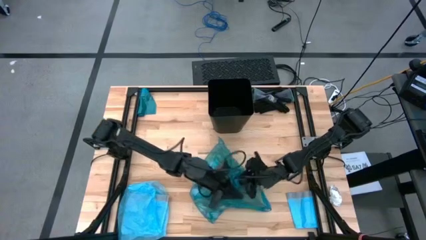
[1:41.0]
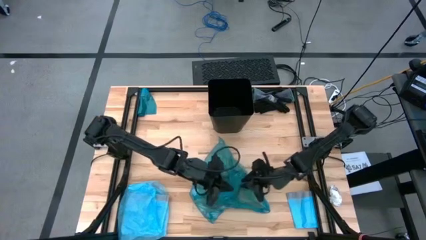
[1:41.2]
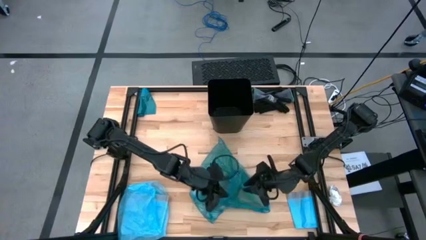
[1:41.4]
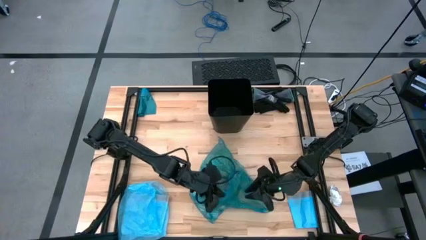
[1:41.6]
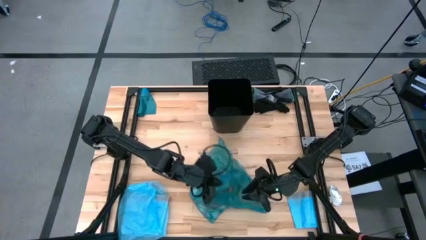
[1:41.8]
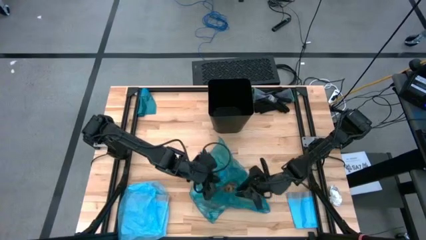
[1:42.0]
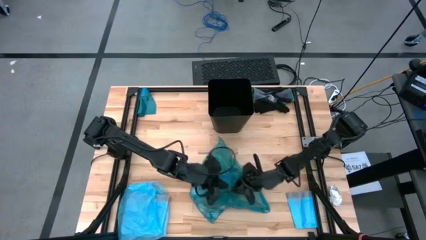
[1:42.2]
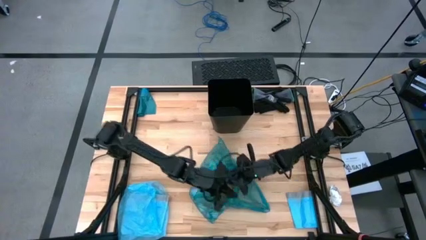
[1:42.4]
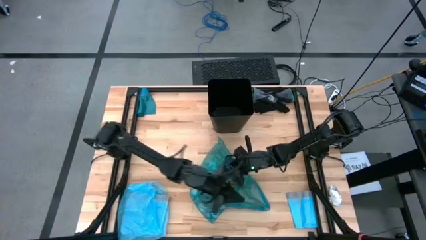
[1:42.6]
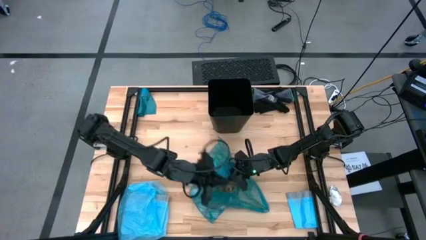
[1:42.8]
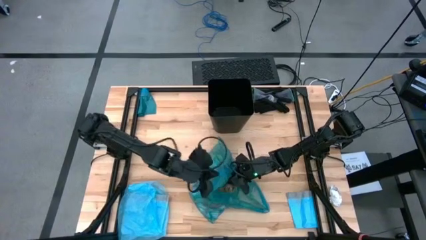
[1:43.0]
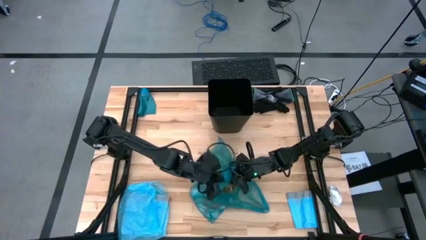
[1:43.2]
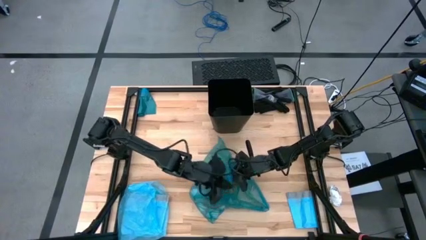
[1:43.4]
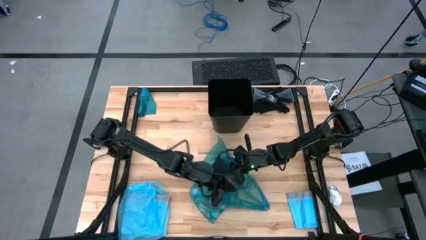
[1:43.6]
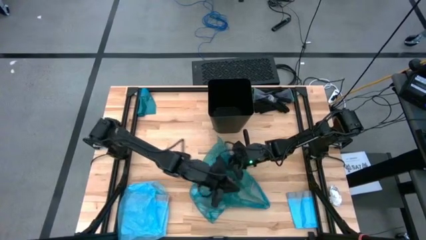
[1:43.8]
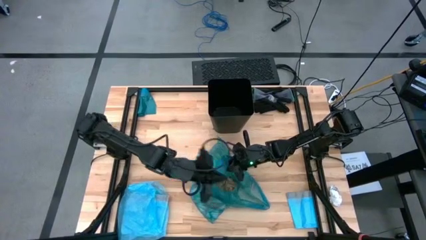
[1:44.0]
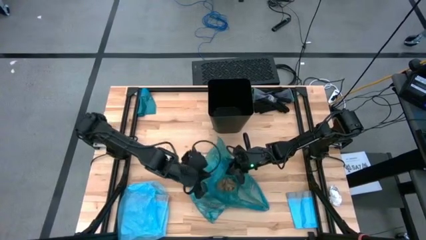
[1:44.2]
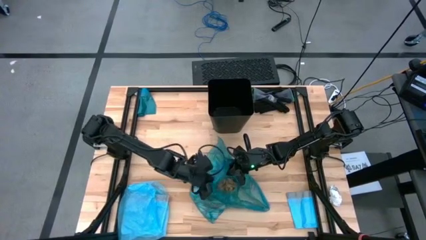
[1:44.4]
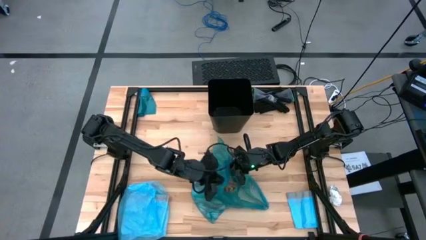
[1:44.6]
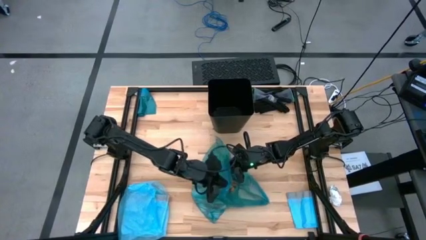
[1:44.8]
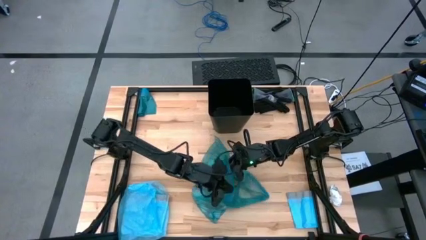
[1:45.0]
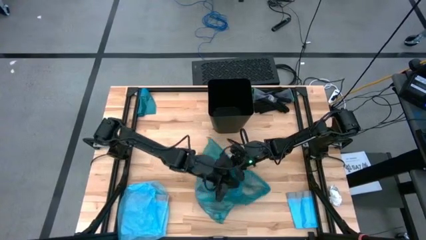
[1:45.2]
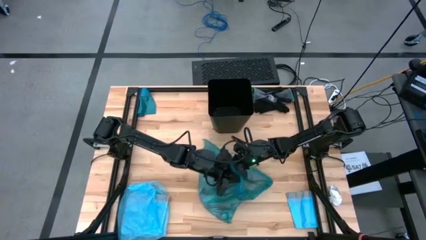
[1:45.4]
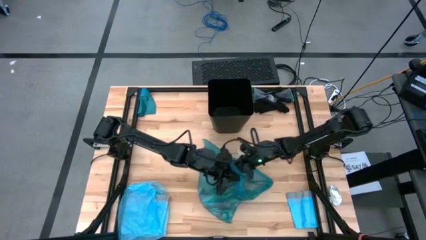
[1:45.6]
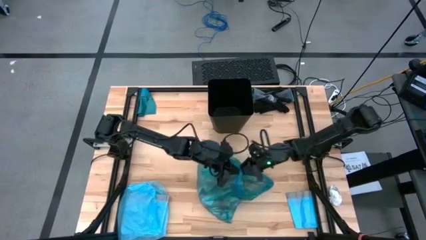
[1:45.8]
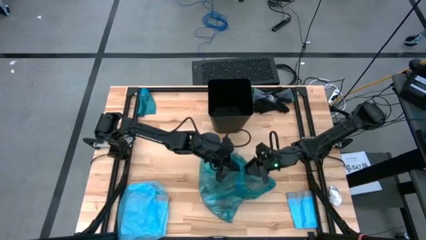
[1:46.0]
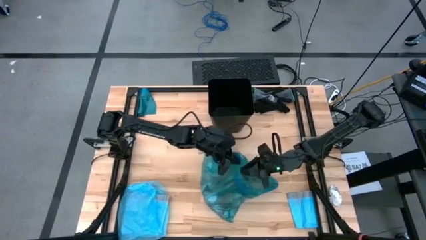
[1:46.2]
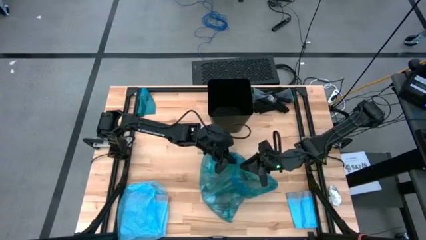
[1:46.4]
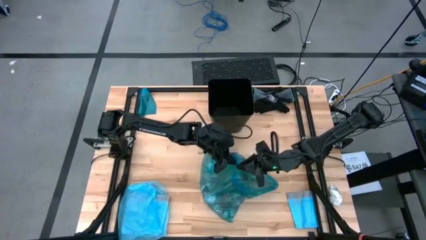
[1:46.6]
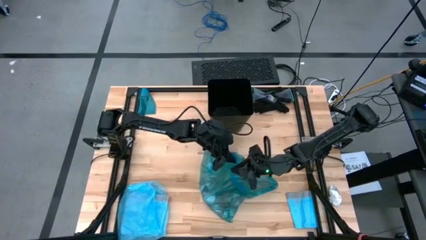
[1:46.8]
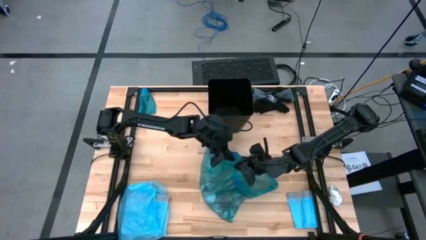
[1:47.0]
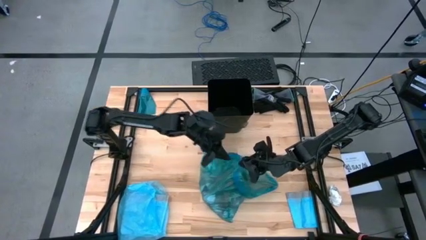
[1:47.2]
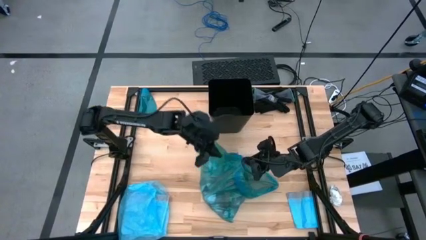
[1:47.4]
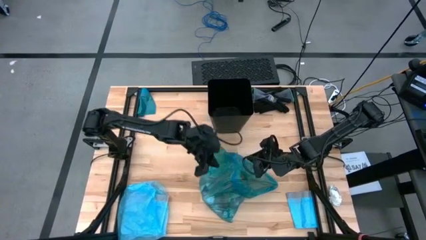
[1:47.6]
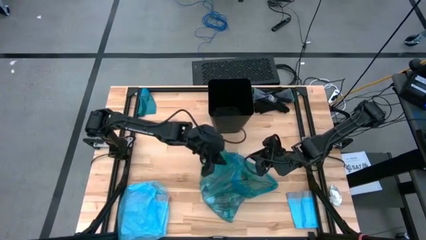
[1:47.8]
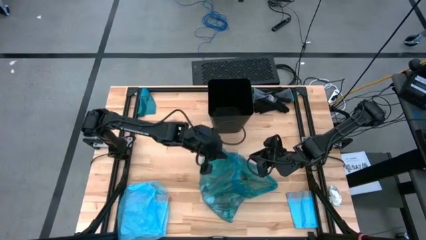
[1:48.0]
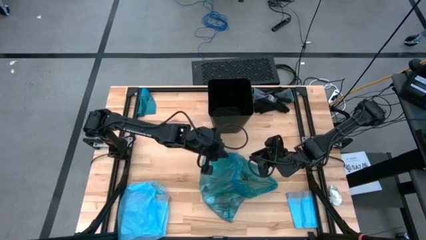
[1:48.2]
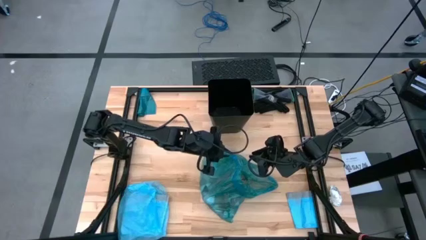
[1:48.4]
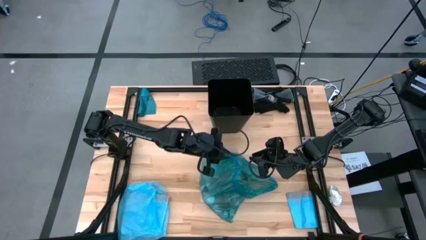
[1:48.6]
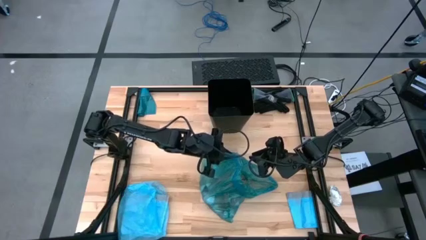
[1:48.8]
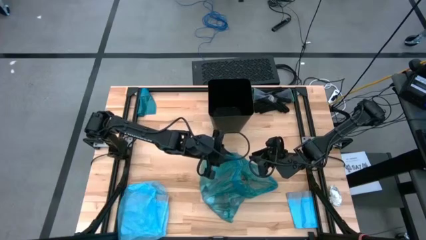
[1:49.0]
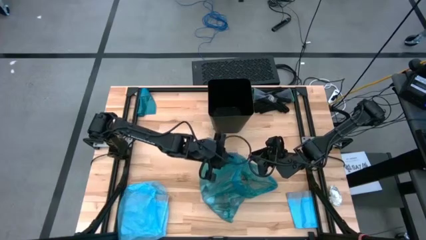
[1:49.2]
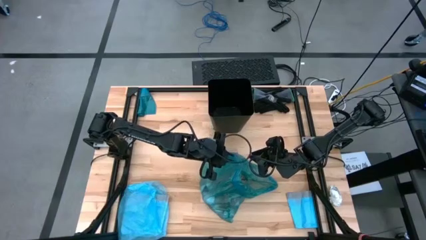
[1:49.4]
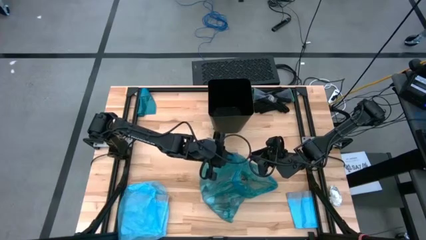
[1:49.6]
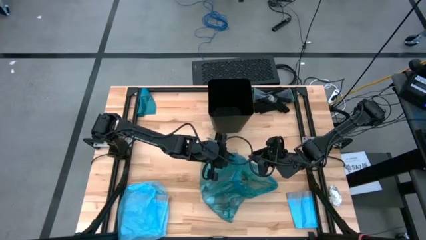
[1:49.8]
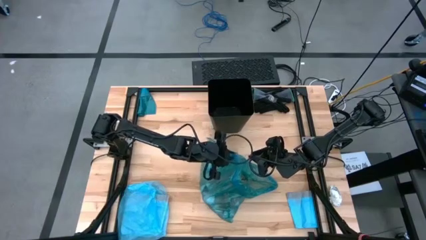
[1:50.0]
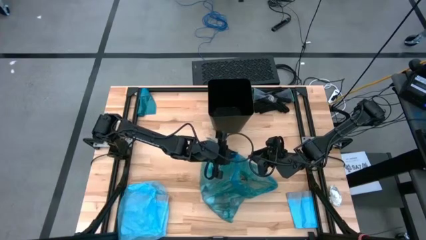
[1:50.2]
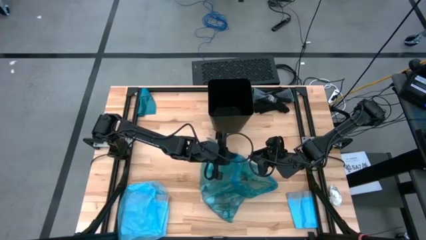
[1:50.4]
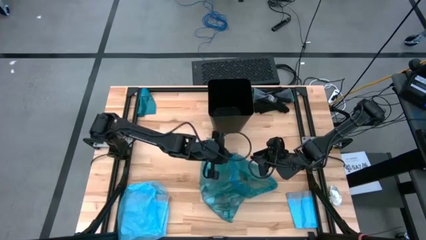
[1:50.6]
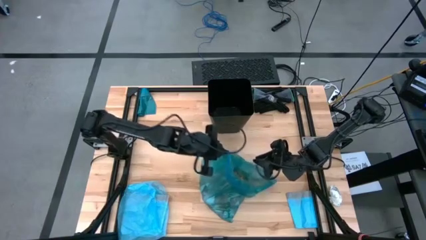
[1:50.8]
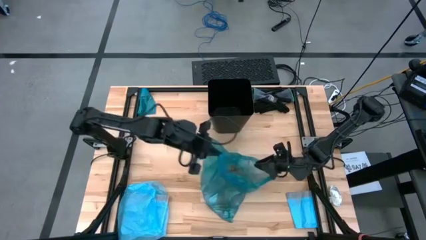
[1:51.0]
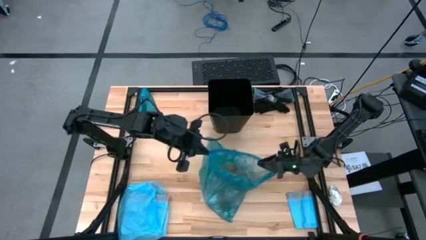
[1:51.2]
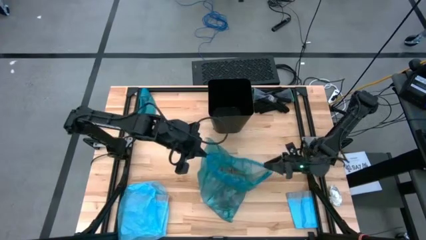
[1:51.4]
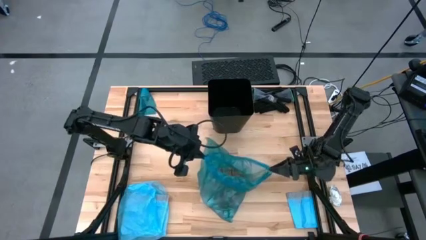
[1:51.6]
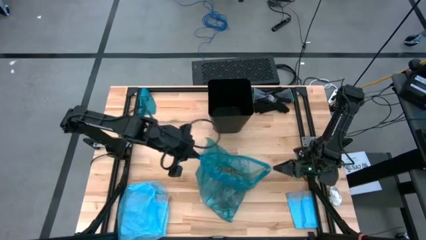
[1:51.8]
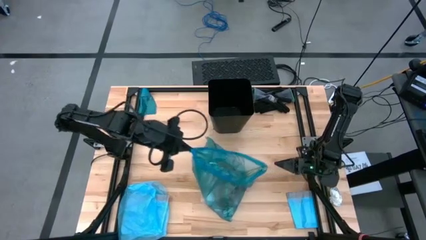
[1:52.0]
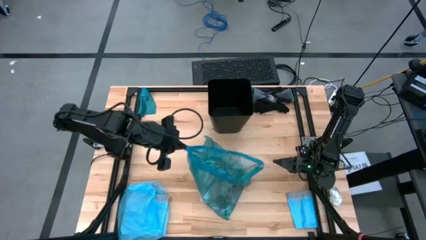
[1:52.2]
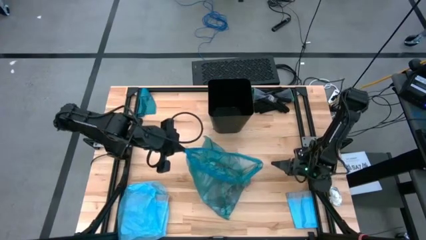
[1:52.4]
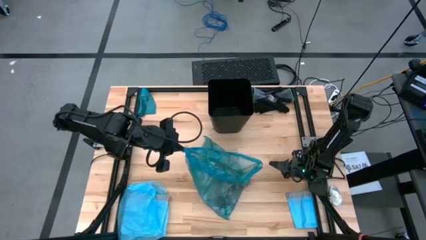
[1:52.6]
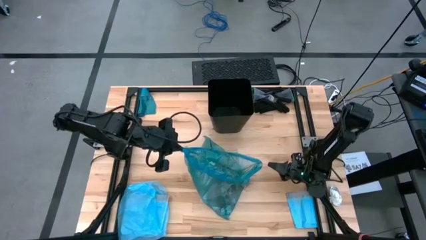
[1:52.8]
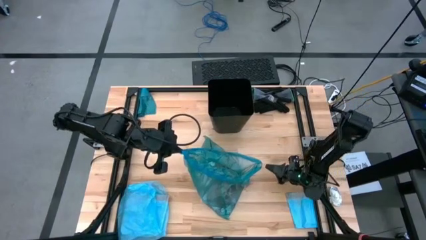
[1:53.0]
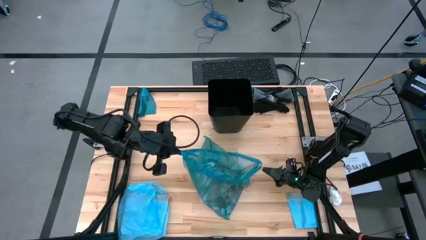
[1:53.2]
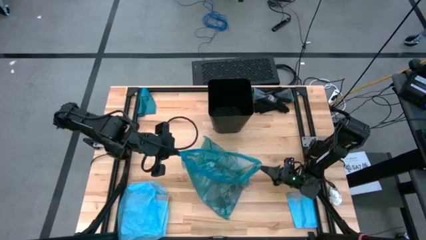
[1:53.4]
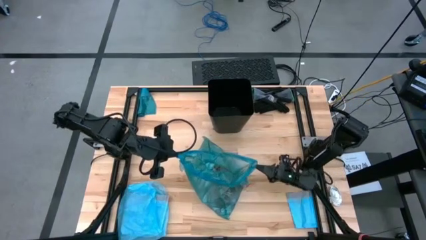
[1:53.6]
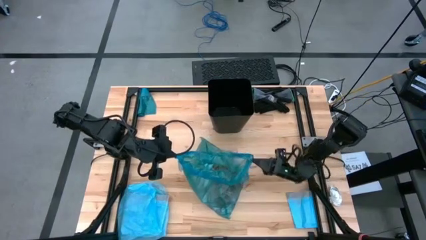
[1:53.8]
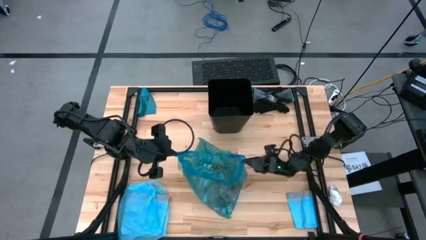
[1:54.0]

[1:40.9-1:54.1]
Task: place trash/remove bag and relplace
Close the blue trash bag

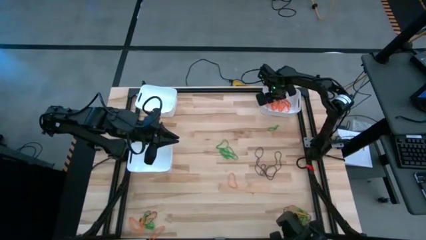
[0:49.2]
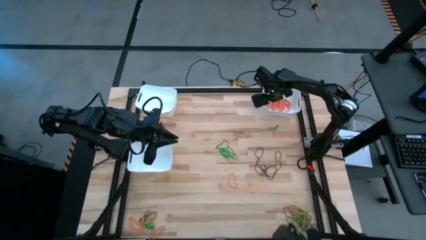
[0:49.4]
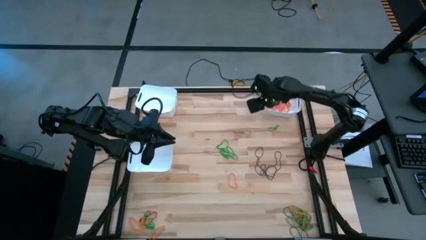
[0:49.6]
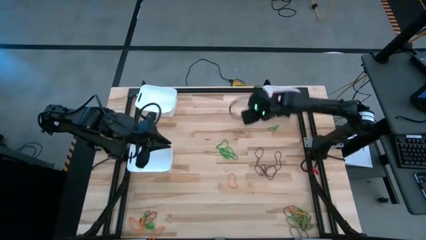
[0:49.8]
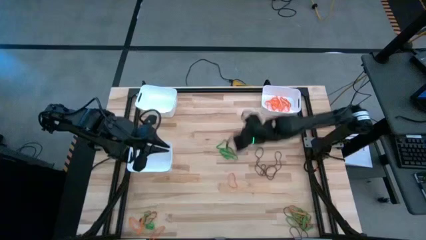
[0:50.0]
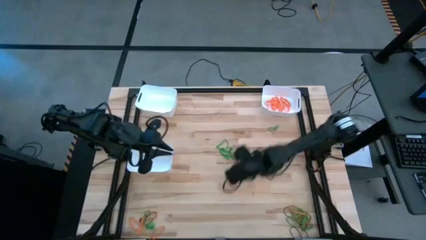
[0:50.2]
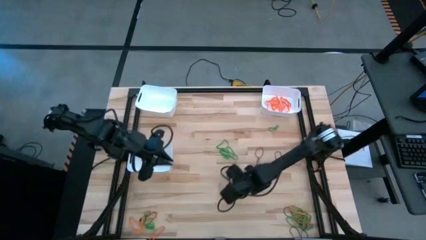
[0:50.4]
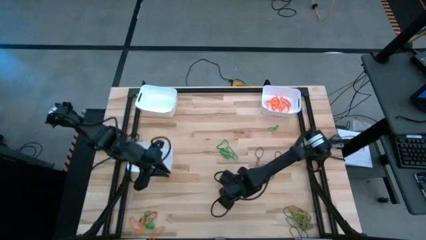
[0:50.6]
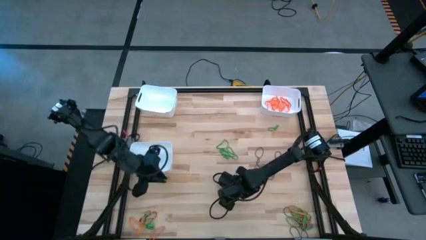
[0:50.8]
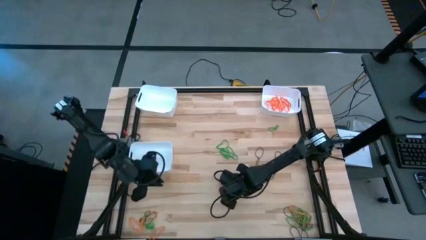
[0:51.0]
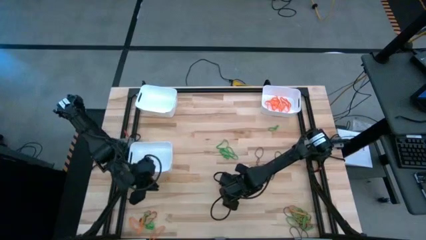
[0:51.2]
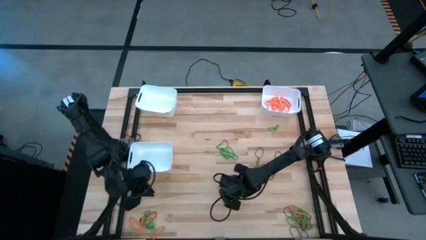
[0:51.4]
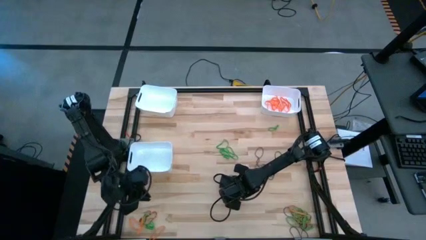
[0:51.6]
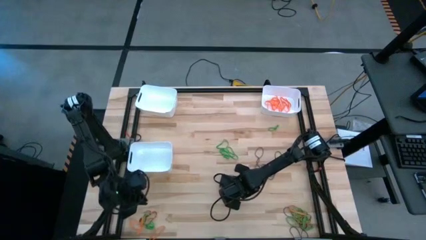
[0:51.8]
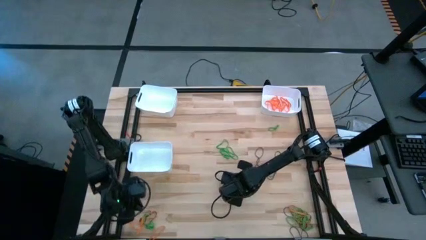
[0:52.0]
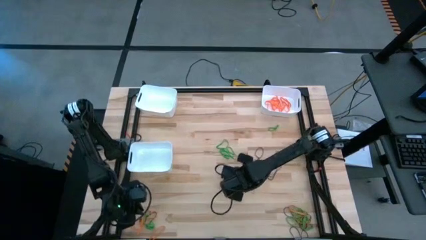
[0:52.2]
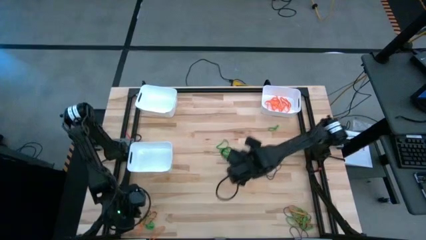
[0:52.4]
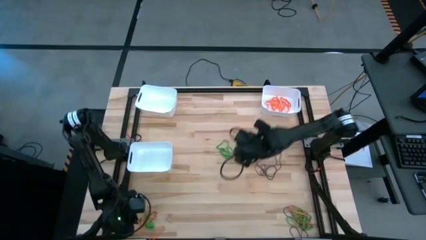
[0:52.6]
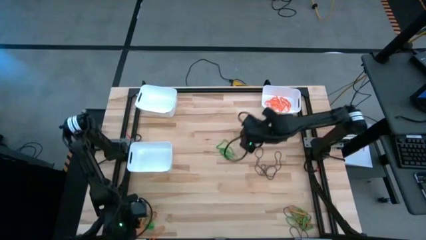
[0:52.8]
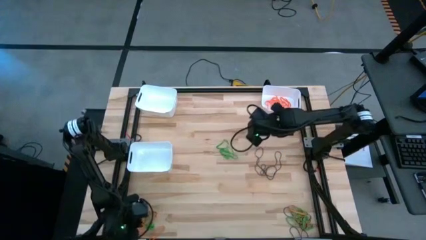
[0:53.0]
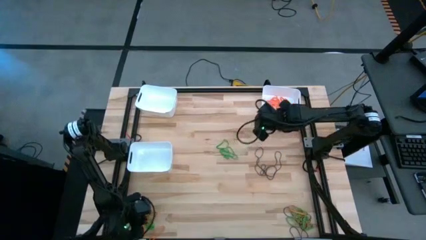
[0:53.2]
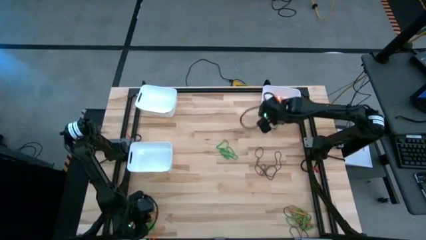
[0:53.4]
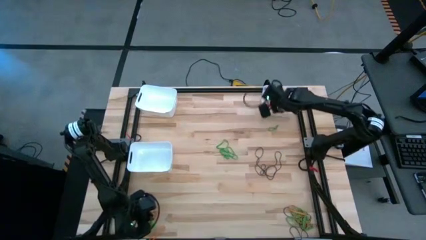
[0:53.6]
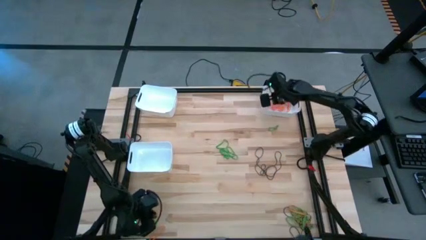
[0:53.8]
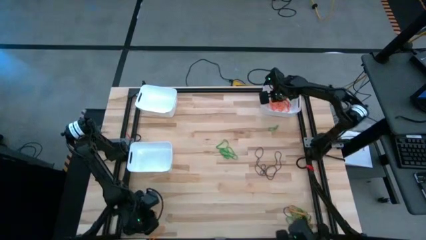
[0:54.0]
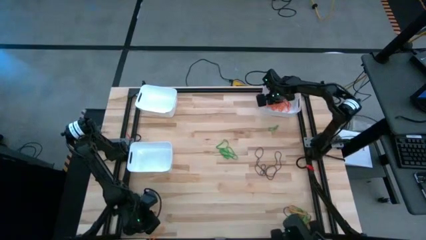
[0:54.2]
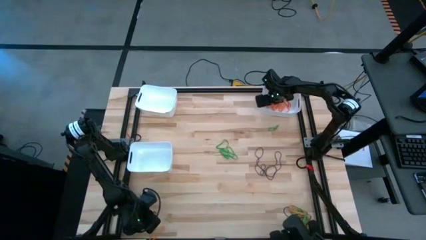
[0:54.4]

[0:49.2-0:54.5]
Task: Sort rubber bands into baskets
Put the orange rubber band into the top right white bin
